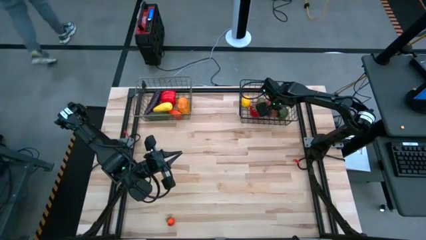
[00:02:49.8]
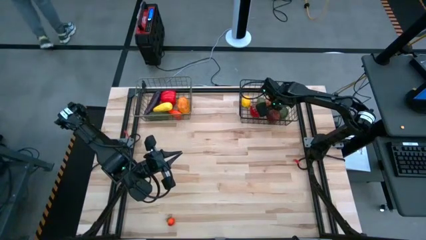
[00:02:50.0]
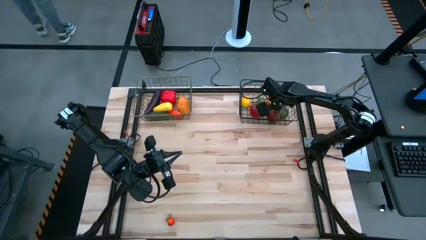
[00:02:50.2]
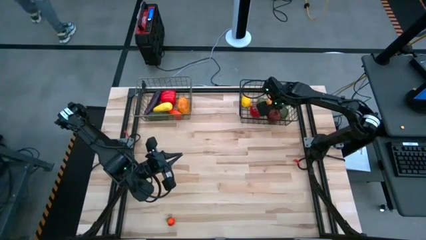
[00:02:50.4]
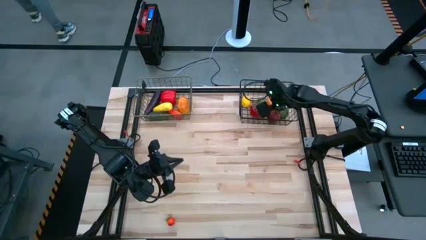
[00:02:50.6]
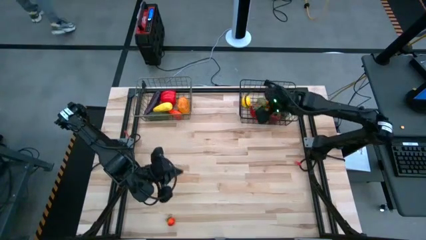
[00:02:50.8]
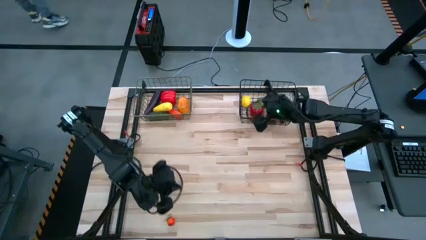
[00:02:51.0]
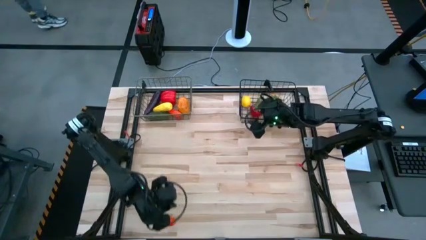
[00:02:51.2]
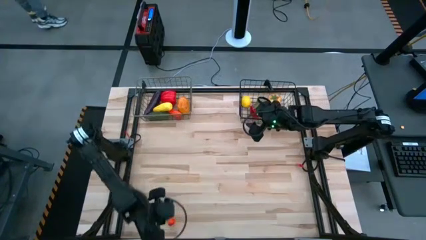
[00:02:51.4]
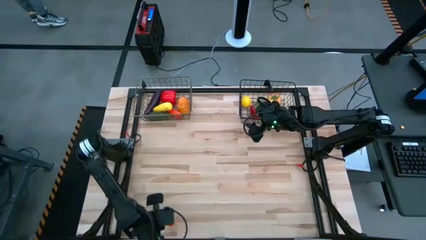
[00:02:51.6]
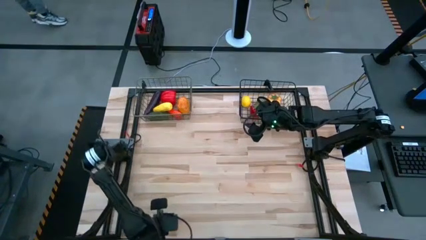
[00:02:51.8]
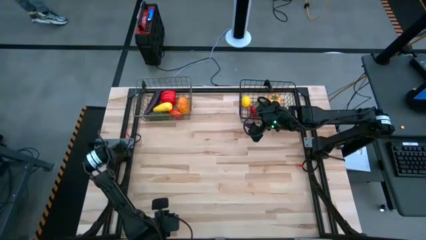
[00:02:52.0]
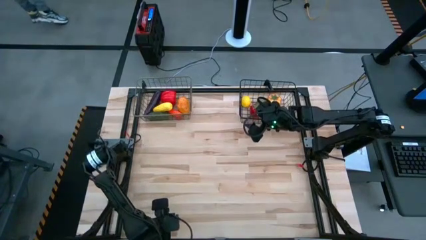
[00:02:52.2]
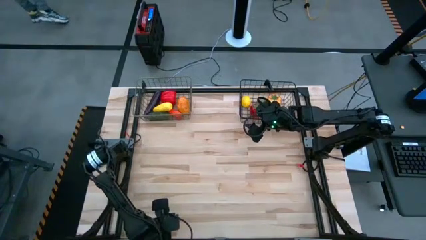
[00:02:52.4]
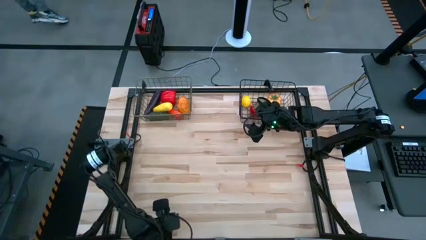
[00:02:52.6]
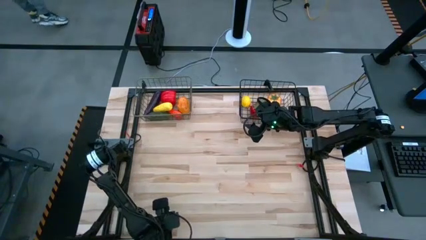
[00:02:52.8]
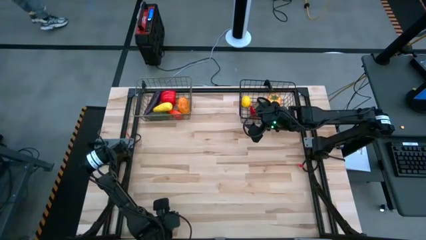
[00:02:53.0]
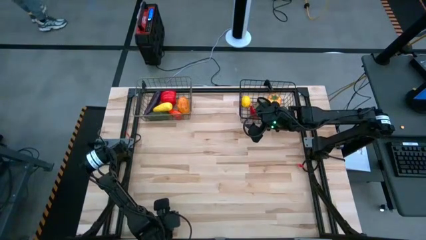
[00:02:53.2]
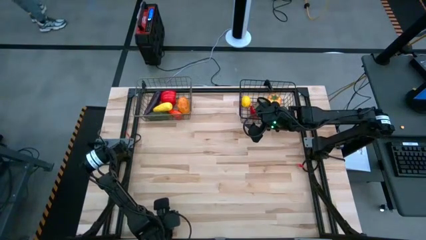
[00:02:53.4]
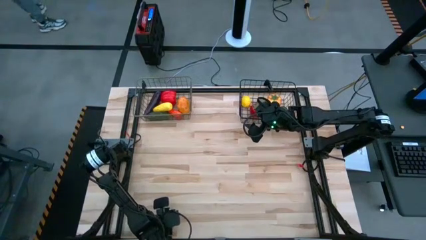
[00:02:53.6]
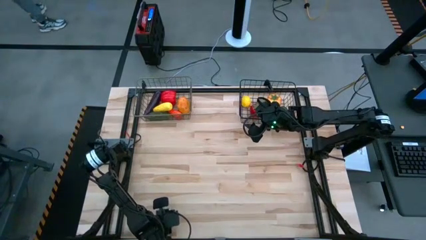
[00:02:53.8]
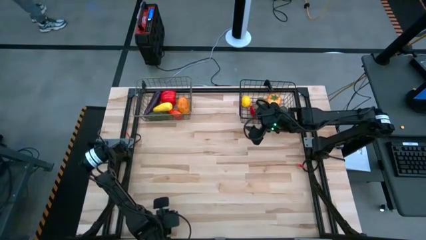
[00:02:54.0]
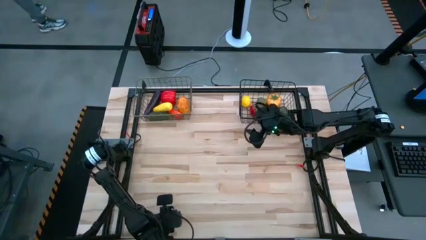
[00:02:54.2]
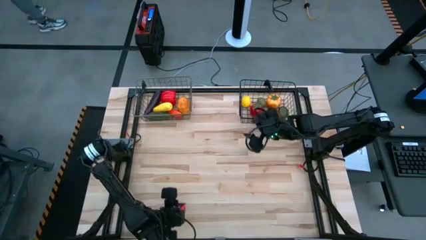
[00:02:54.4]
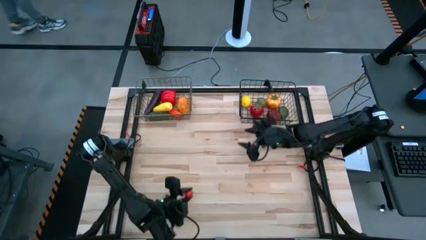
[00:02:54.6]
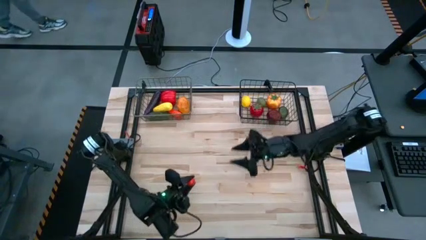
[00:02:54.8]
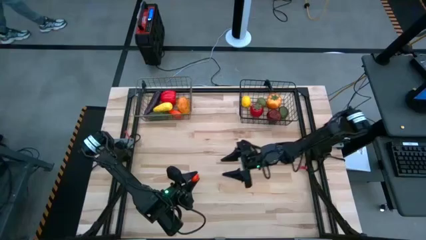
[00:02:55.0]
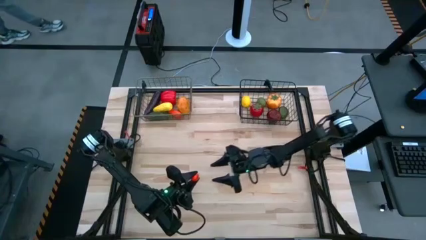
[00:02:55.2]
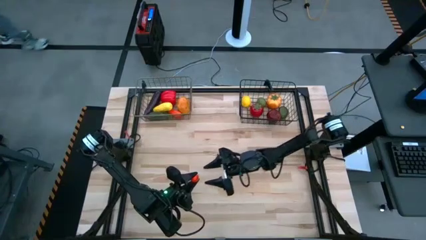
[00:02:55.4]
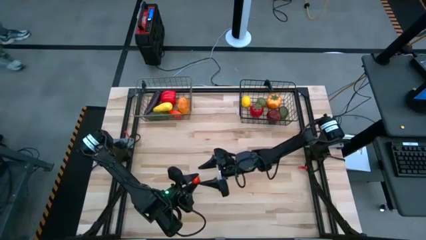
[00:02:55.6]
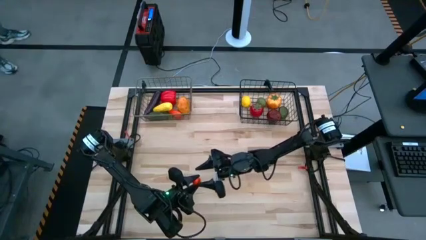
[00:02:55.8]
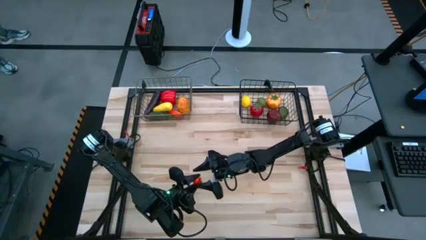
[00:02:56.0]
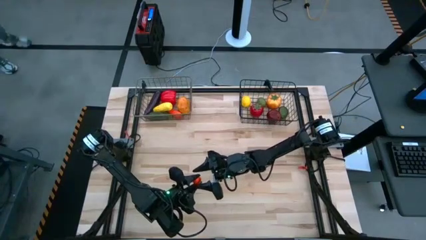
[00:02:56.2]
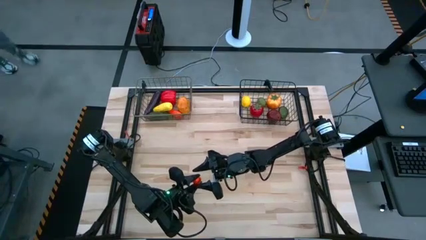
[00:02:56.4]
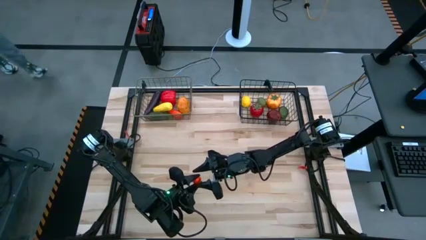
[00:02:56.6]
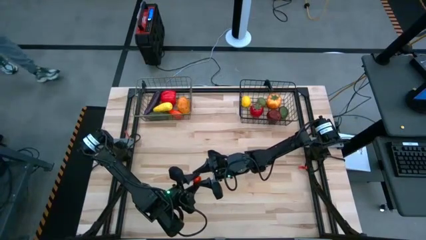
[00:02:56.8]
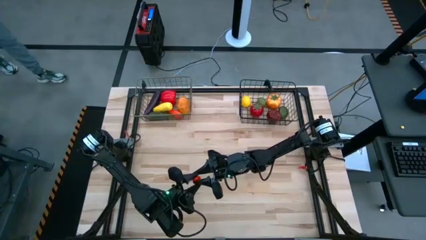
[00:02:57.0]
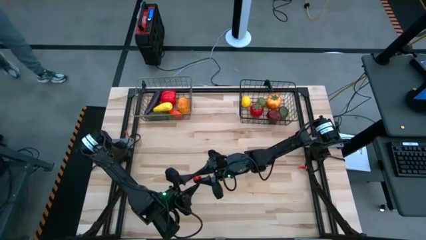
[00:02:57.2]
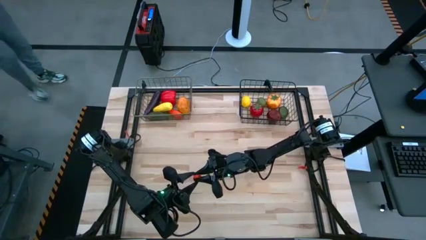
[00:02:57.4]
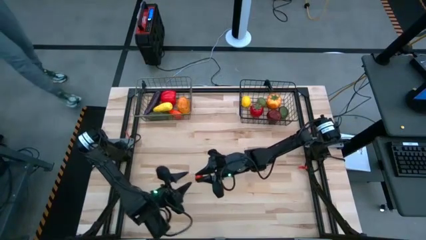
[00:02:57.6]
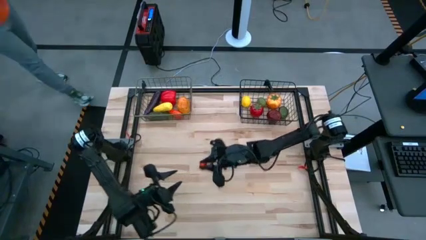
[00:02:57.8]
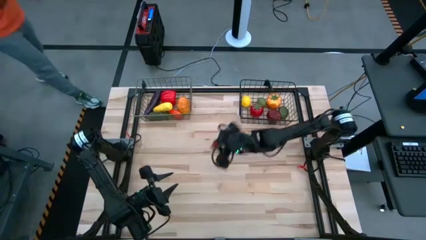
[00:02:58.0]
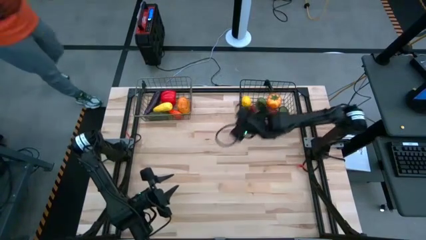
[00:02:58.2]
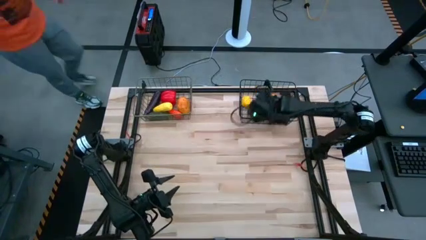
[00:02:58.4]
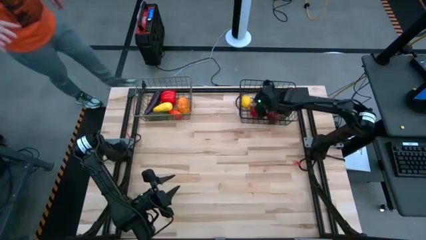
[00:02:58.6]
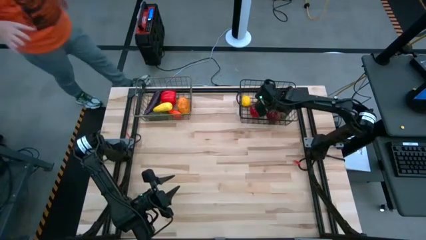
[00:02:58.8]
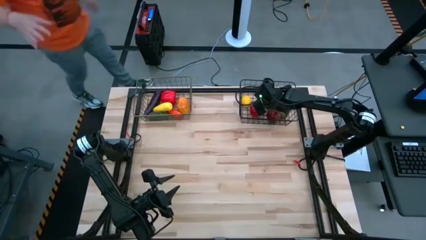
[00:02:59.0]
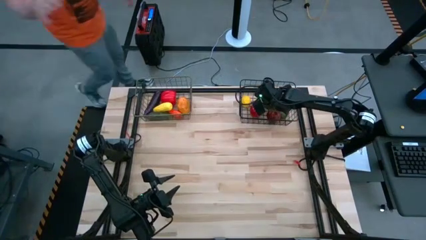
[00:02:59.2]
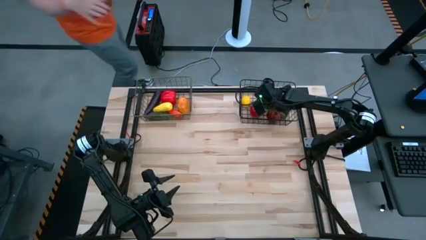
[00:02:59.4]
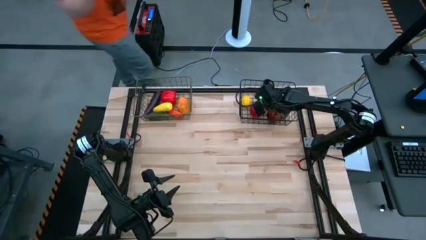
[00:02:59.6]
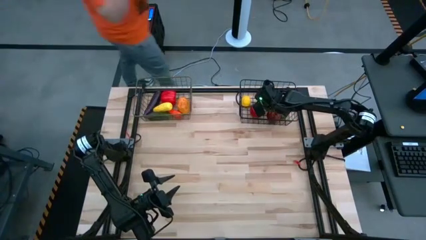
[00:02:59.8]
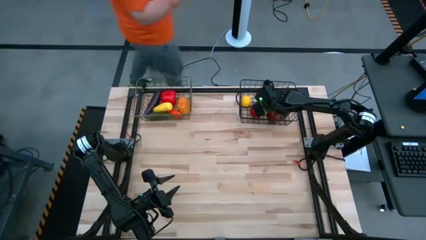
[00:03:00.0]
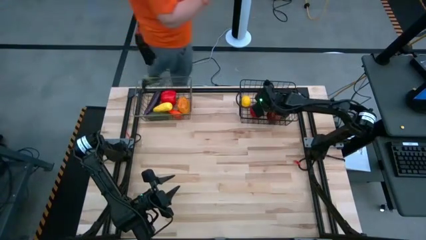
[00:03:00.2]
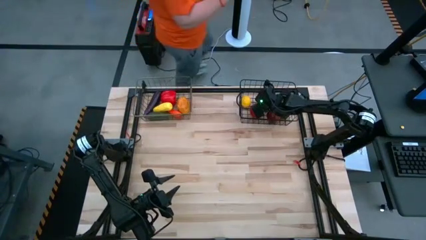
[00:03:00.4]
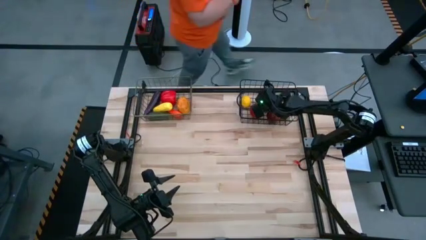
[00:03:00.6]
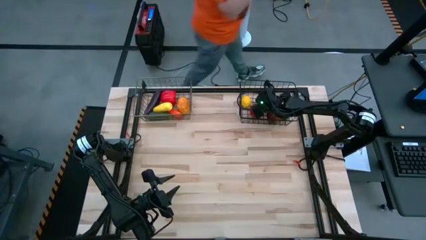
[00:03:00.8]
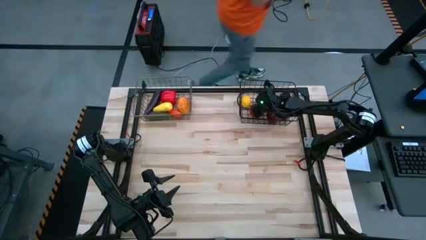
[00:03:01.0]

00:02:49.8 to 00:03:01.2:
Task: Sort produce into baskets
Put the small tomato into the black wire basket

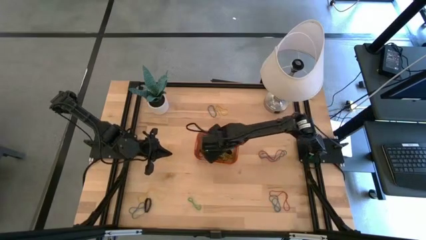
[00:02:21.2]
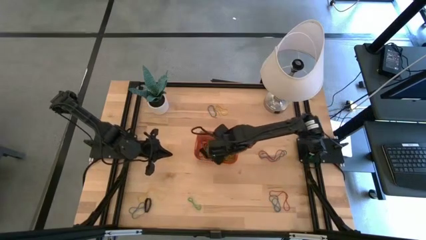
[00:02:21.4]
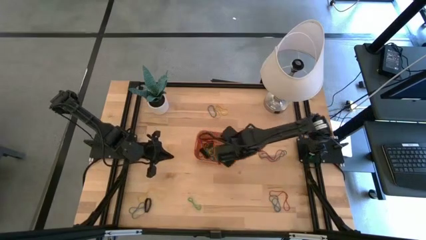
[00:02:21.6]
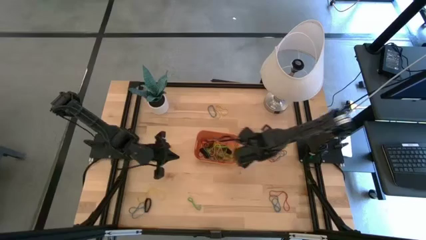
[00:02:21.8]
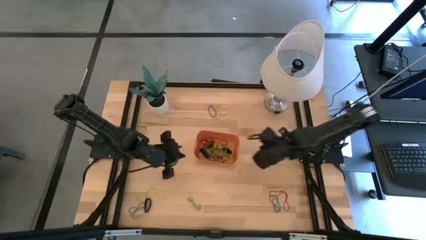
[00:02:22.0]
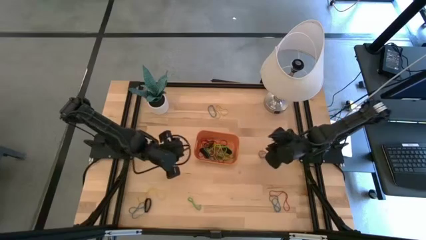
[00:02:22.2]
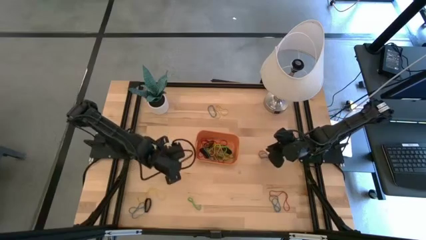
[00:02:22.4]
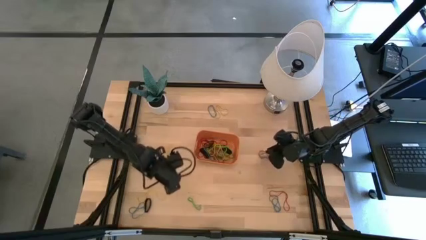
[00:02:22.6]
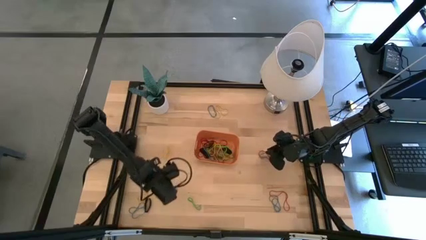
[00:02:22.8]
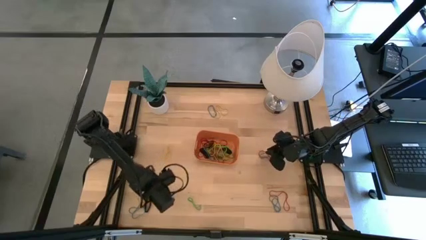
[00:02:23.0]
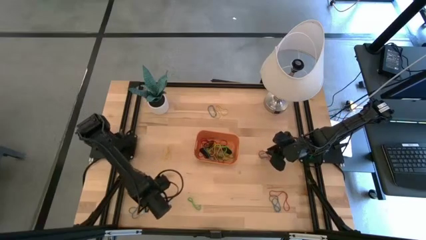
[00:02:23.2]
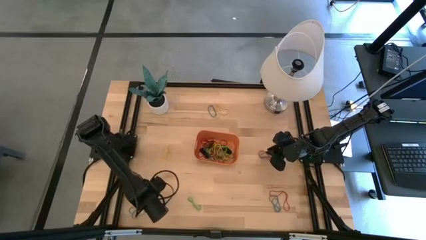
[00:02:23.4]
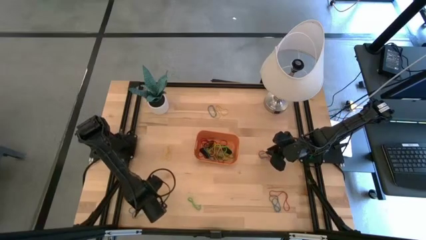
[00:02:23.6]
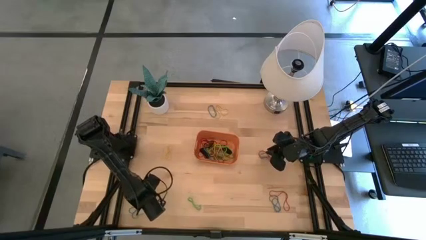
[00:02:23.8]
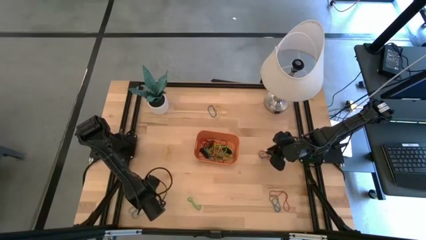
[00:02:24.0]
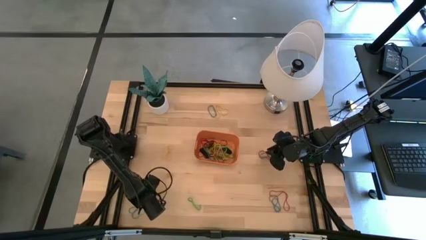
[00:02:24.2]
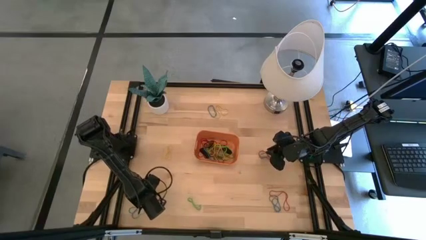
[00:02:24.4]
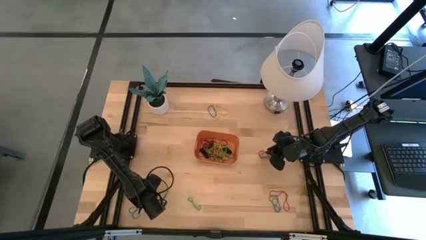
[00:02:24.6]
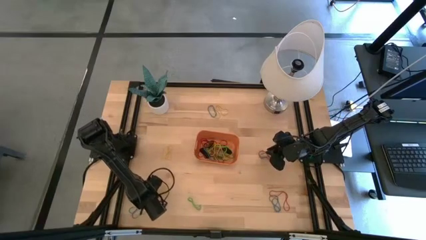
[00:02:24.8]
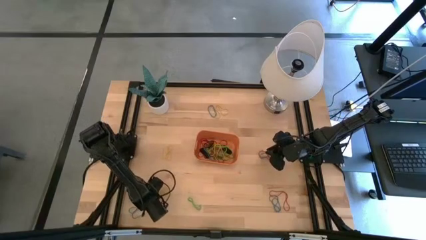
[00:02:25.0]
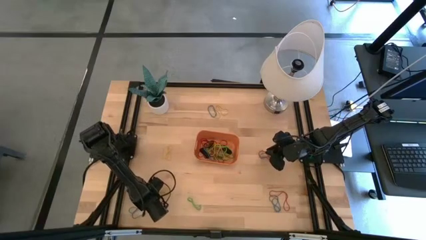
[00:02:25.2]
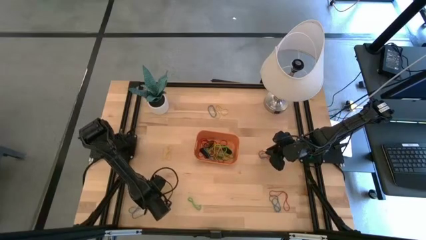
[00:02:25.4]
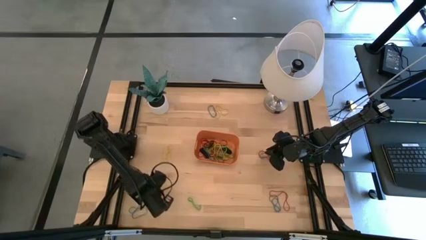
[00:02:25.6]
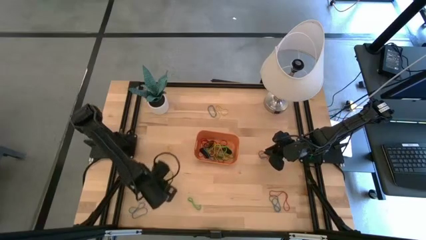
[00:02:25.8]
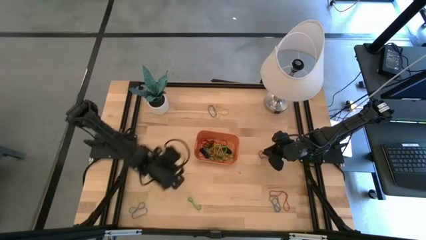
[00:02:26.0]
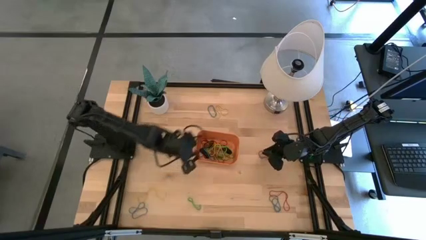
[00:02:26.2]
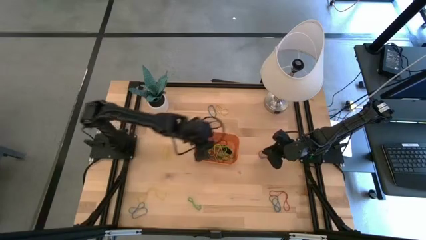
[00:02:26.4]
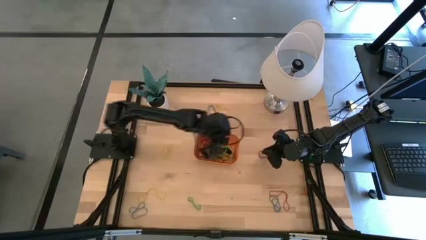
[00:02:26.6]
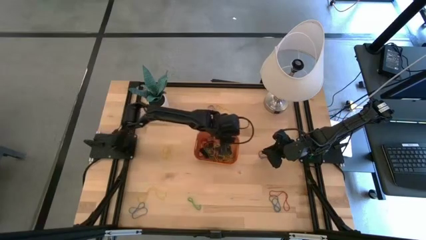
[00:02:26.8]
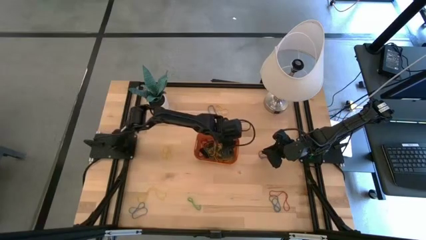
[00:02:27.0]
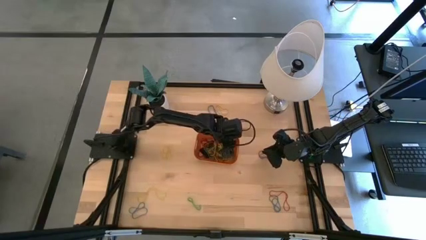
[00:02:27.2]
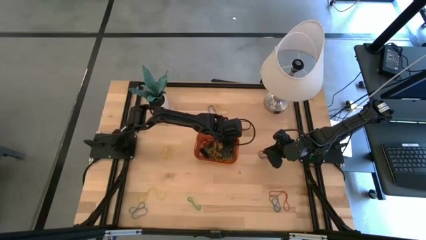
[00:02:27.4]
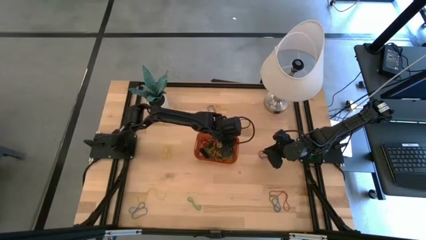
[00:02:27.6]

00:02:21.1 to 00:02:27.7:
Task: Pick and place rubber bands into bin
Put the black rubber band into the orange bin
